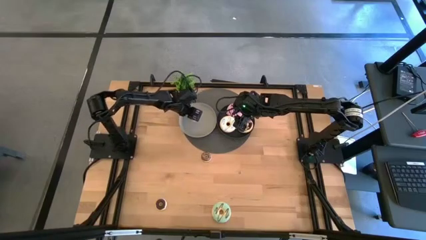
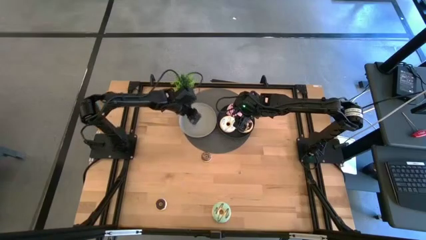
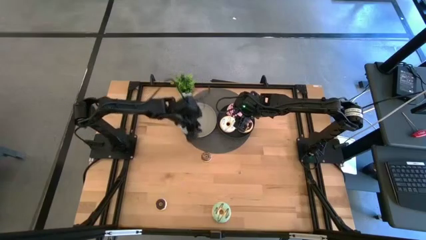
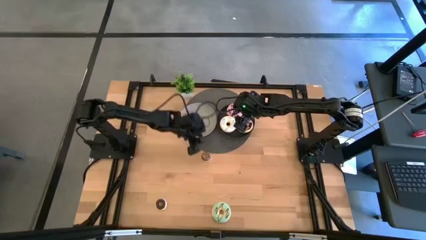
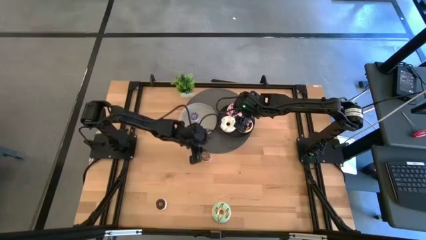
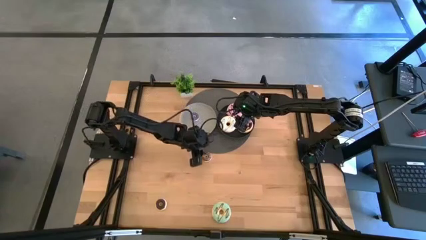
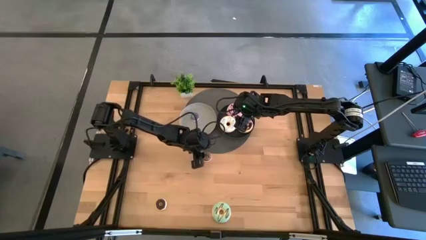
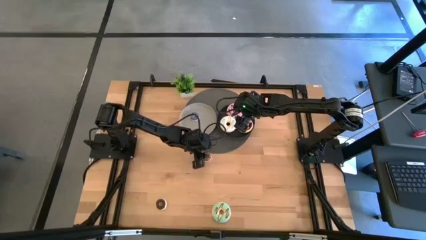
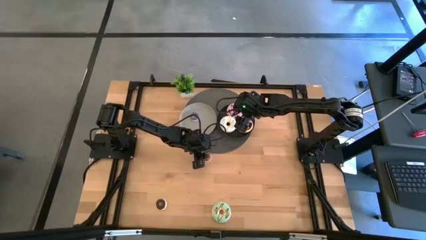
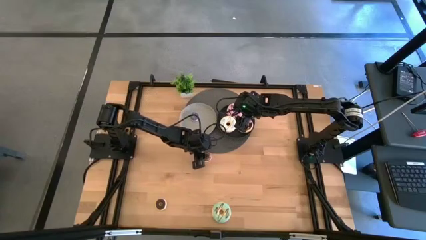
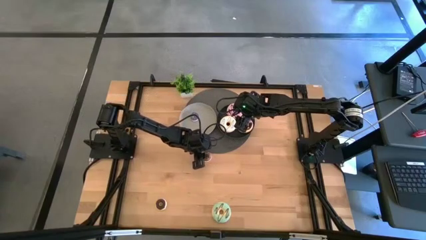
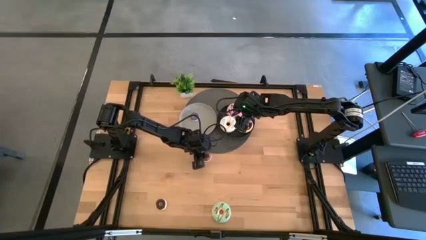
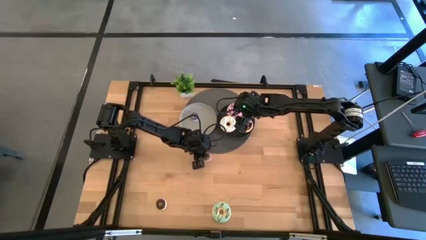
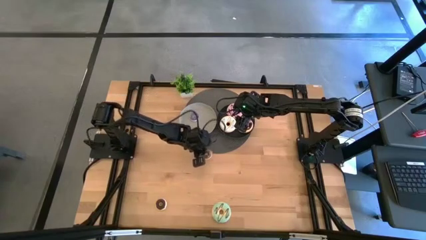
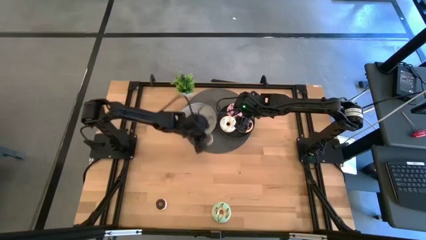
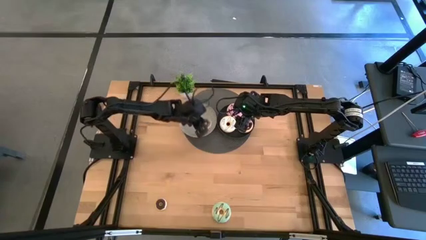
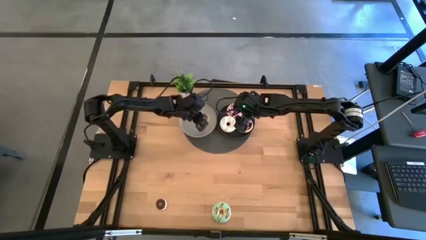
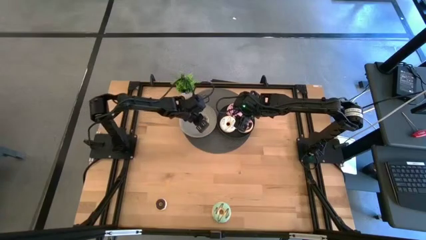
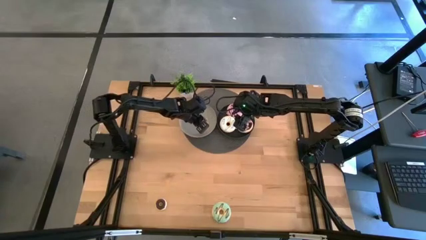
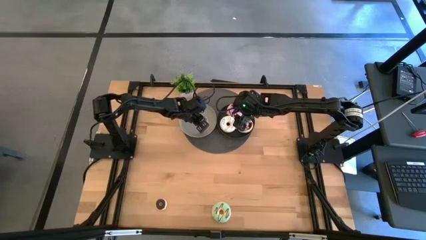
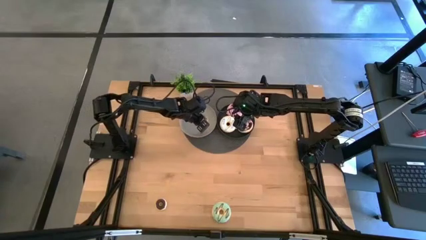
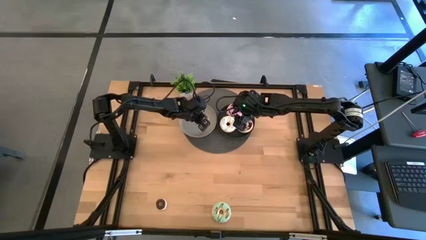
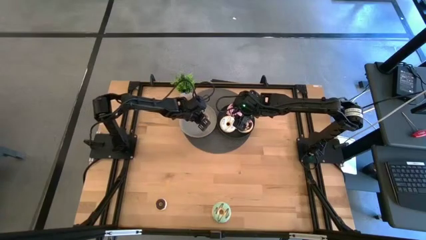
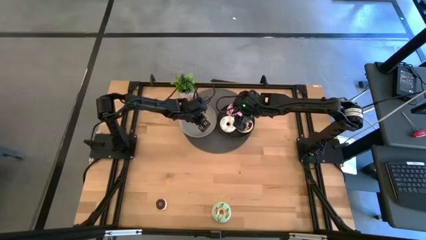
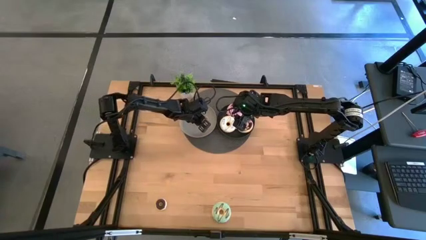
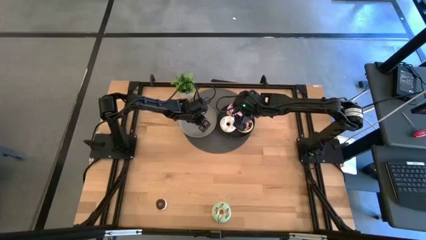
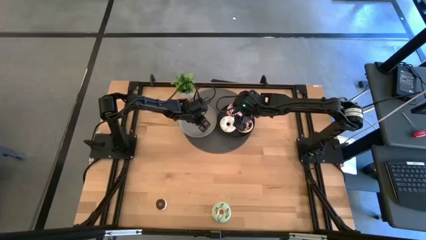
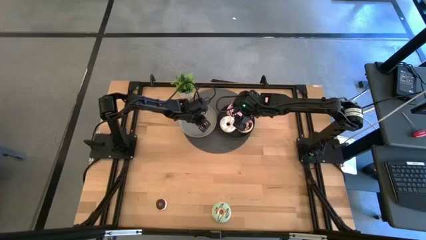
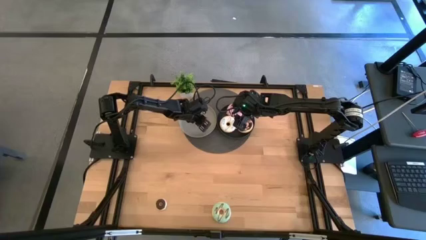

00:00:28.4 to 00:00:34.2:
Task: Pick & Place donuts
Put the small brown donut on the white plate

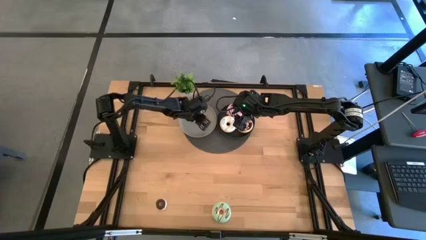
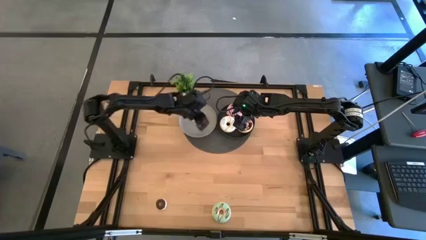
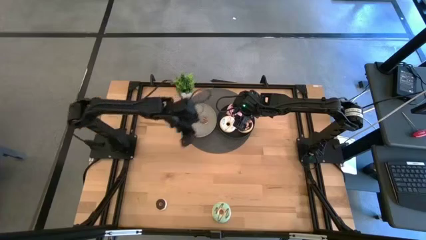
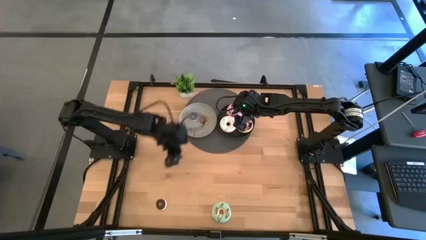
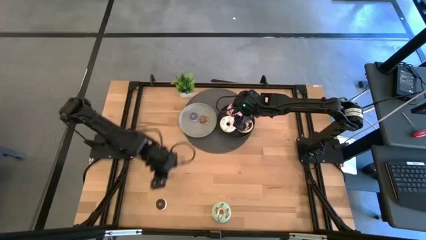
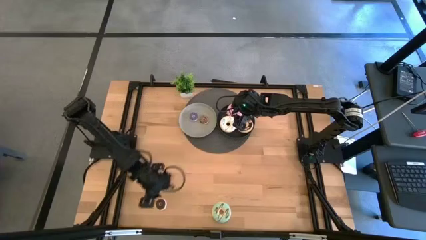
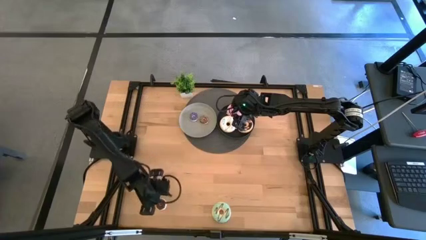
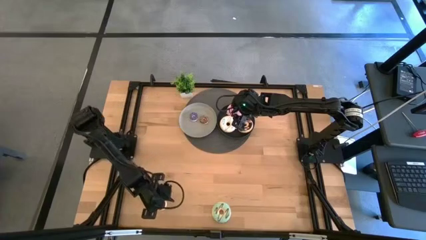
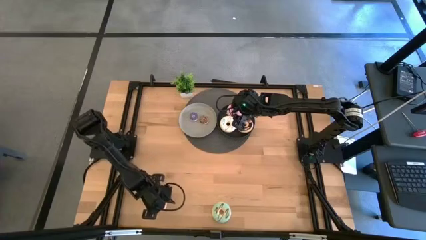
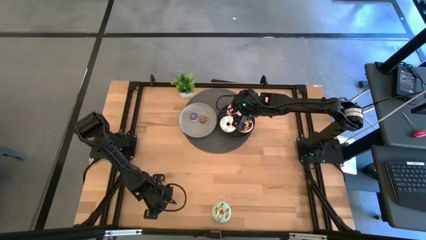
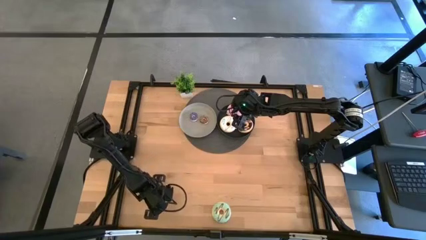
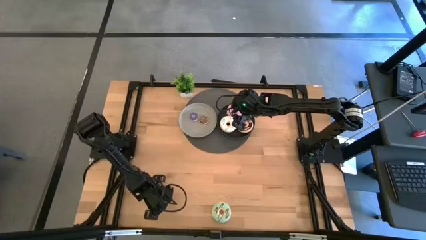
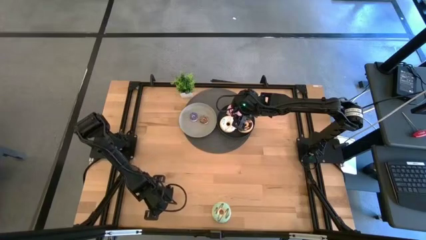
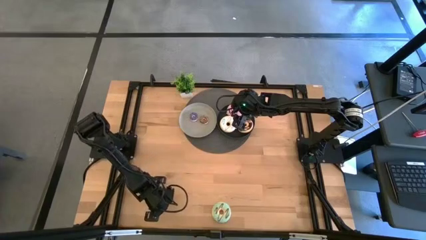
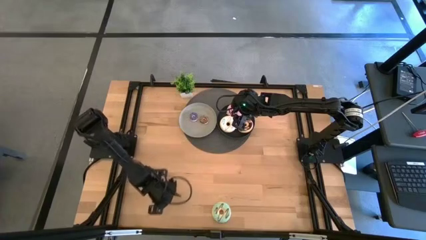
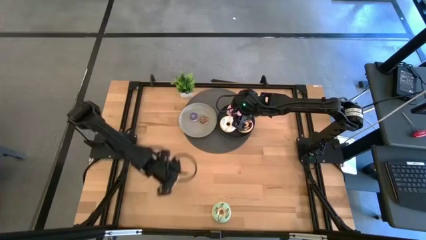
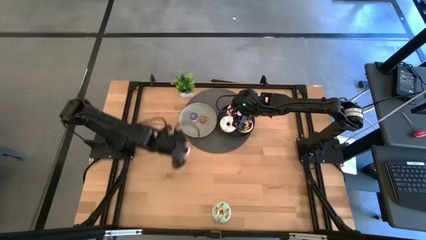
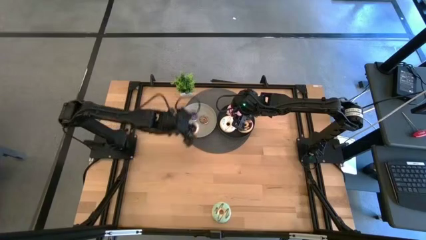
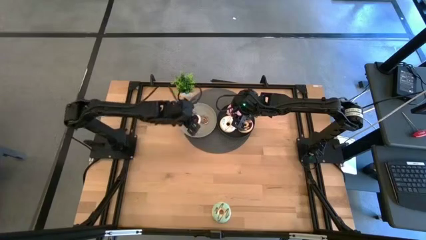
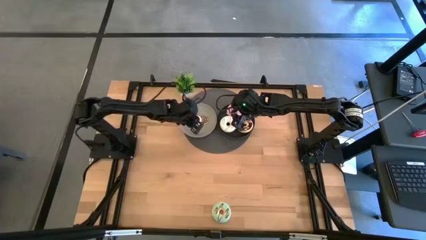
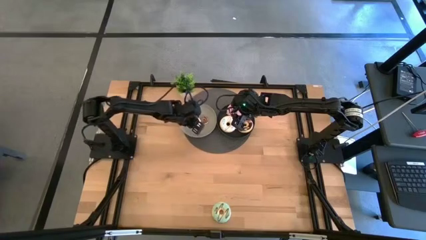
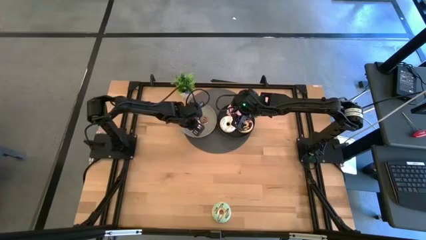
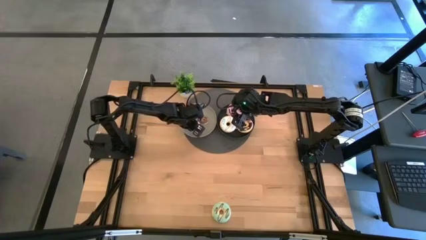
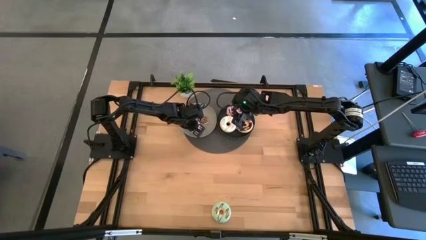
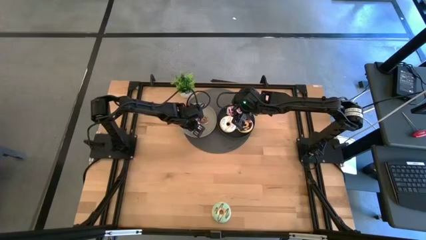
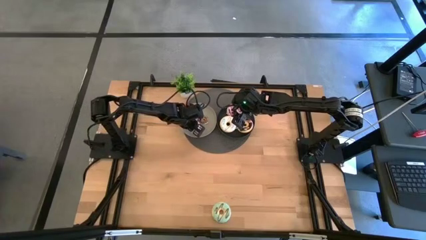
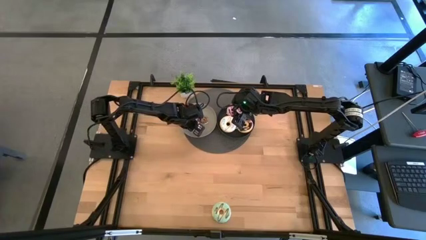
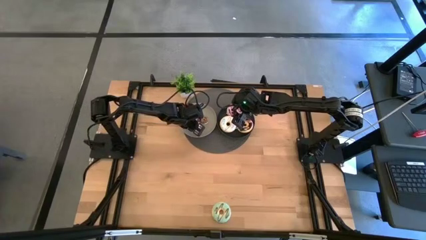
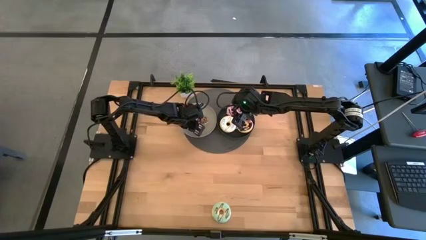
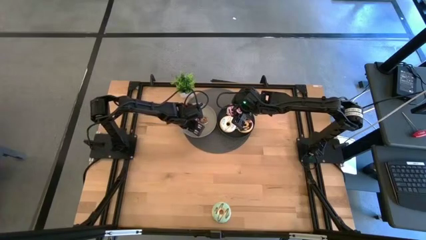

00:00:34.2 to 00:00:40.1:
Put the small black donut on the white plate
